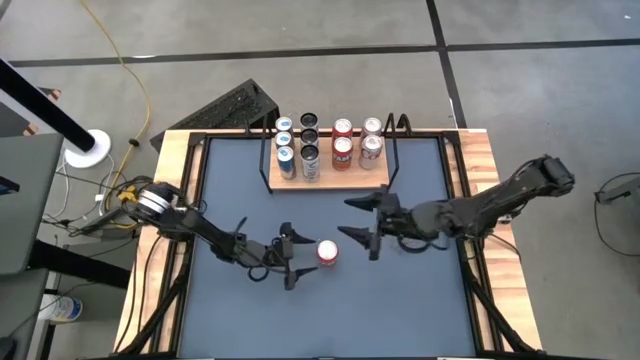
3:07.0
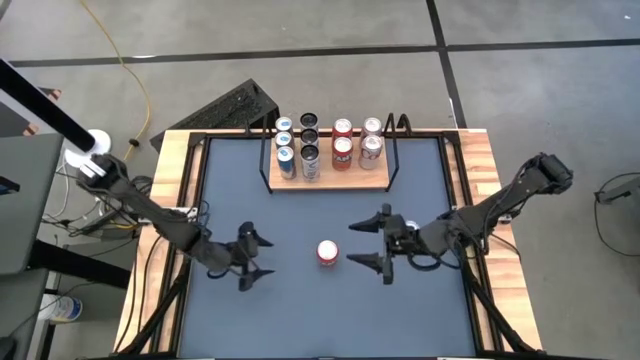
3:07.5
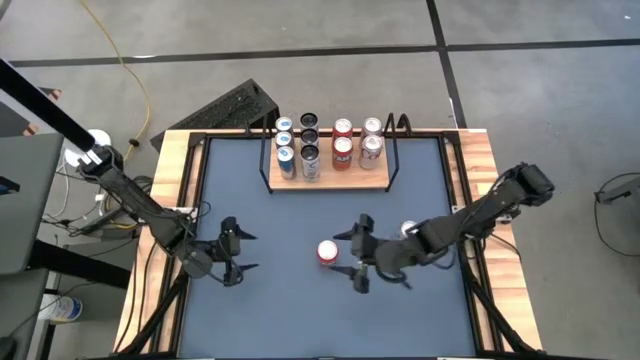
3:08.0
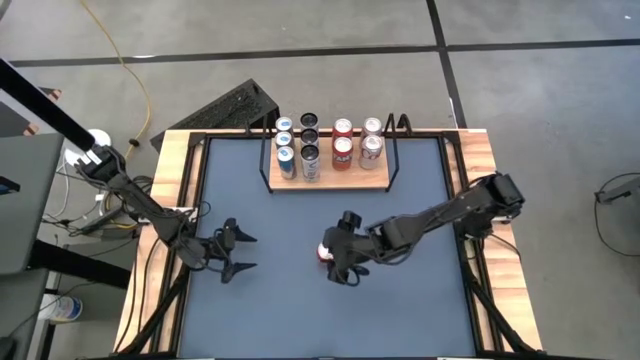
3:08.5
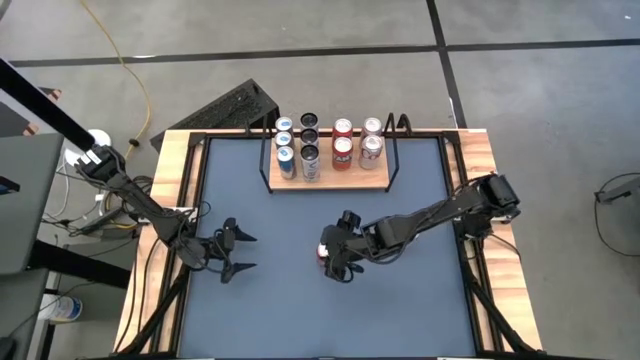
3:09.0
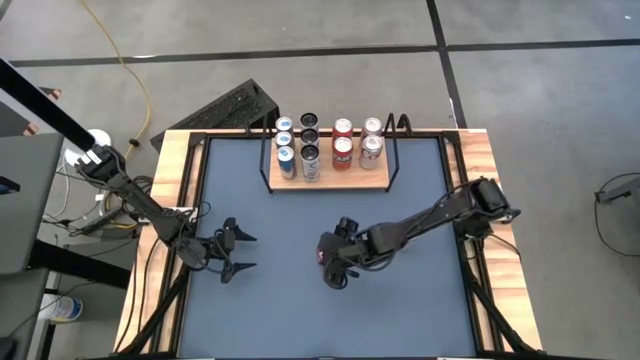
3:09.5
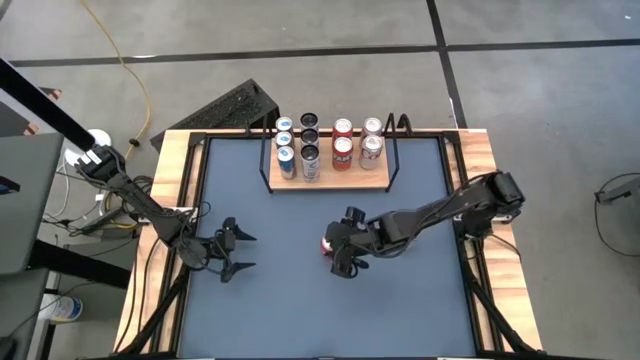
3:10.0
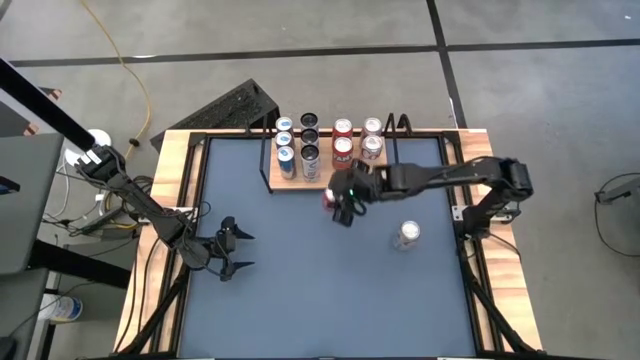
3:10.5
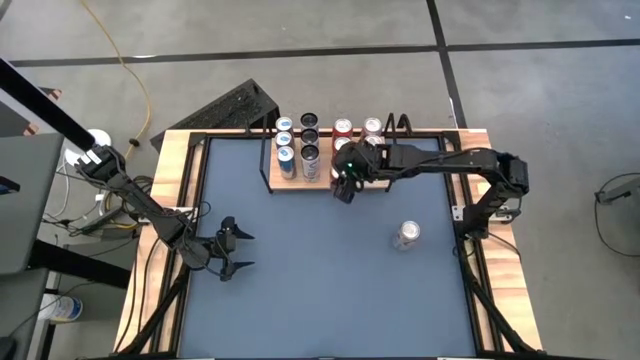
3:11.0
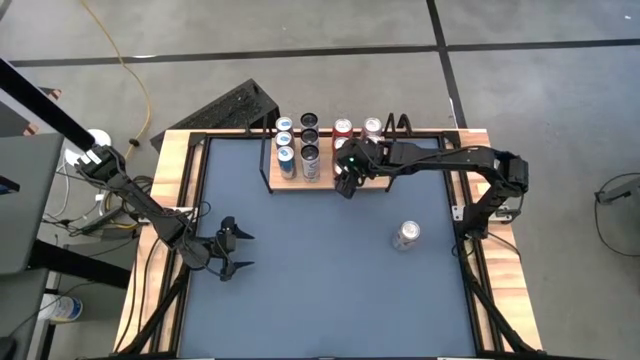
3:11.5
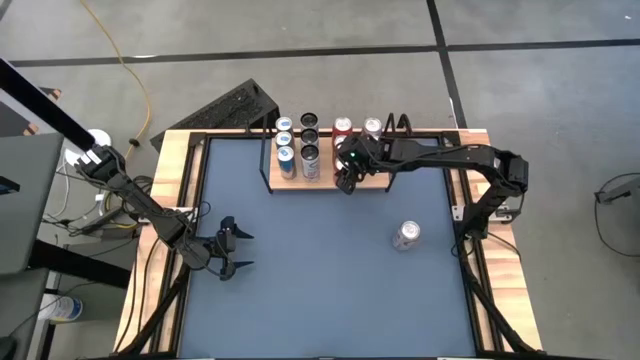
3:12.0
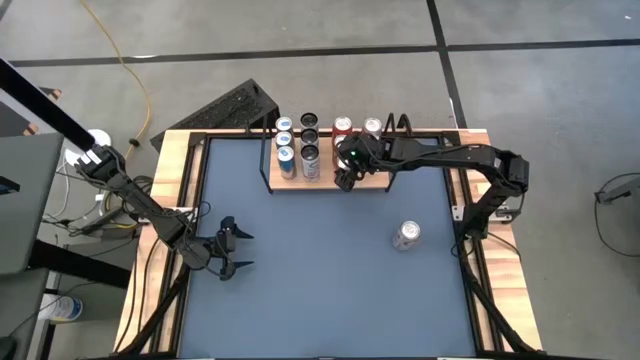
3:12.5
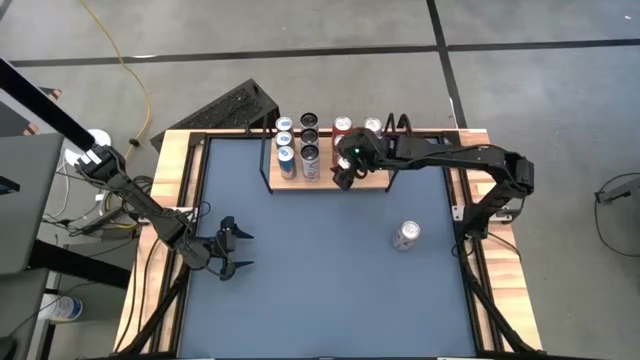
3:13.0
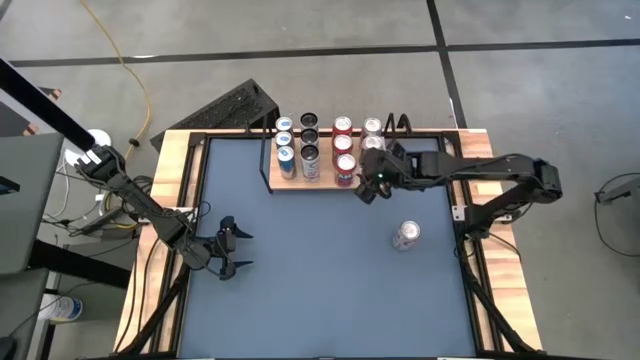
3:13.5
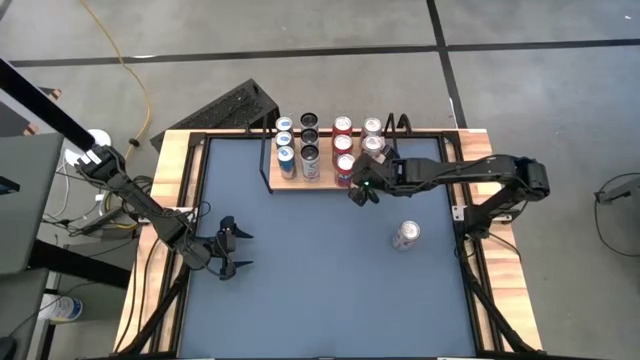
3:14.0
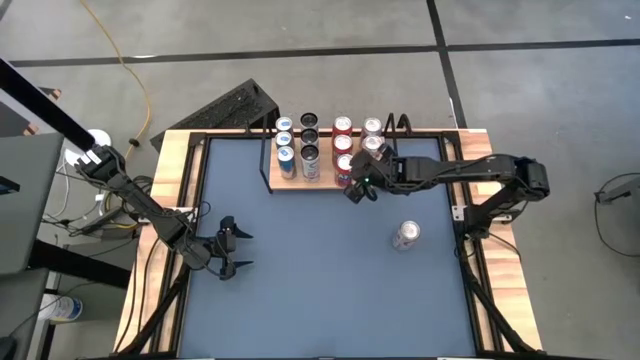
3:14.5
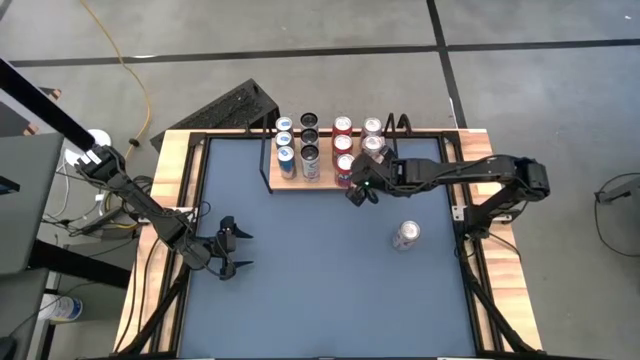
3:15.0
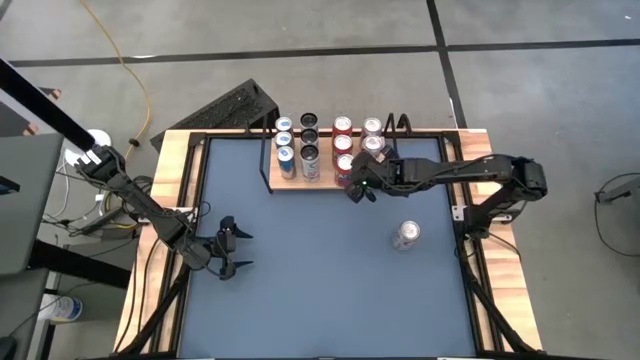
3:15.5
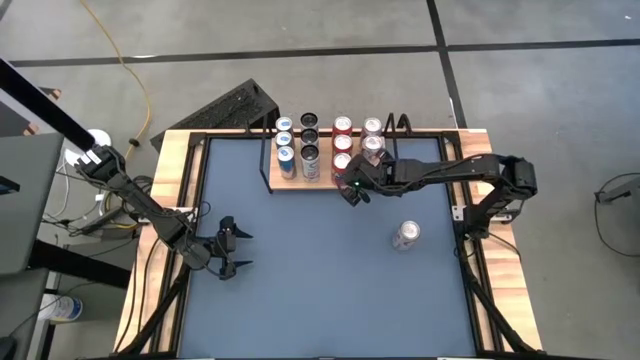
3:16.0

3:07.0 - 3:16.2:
Task: Place canned beverage on shelf
Put the orange soda can on the shelf aligned with the other orange soda cans

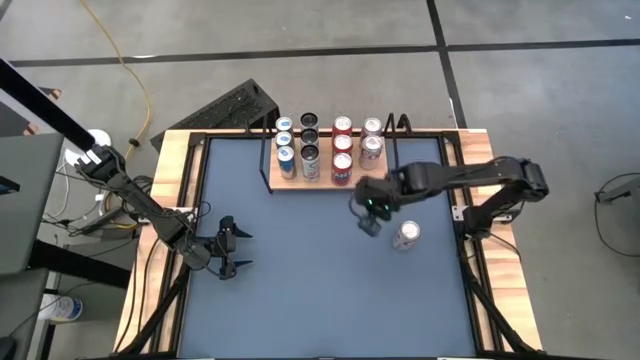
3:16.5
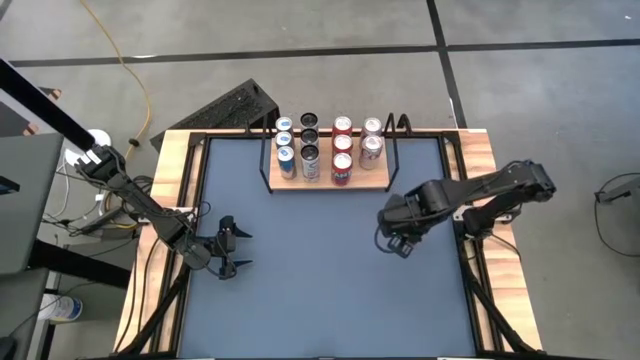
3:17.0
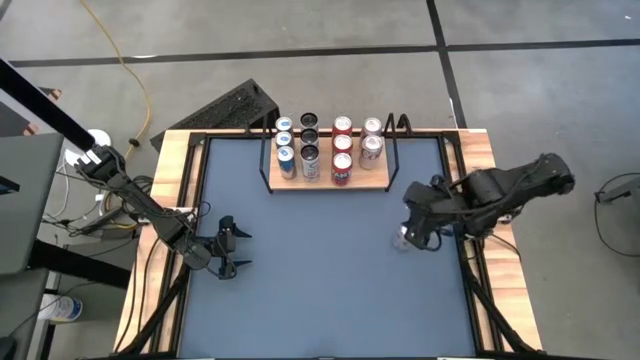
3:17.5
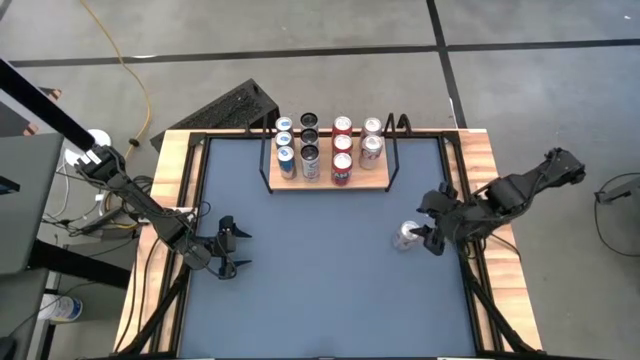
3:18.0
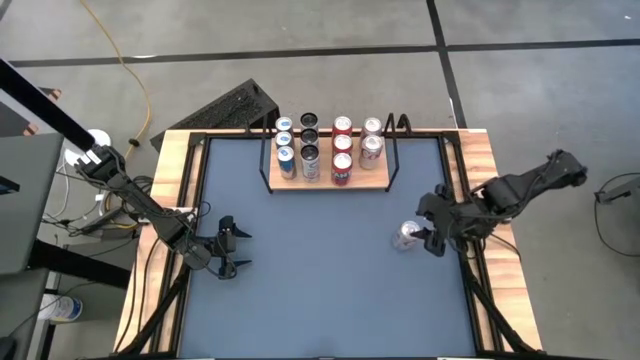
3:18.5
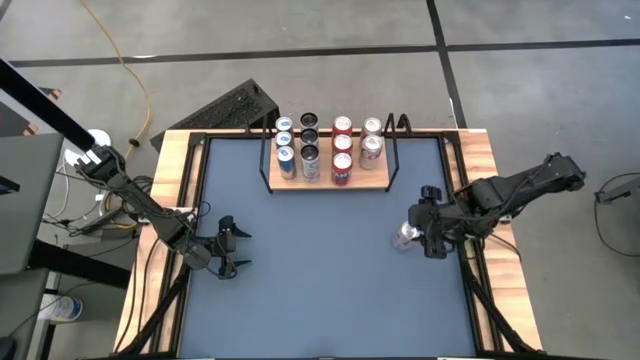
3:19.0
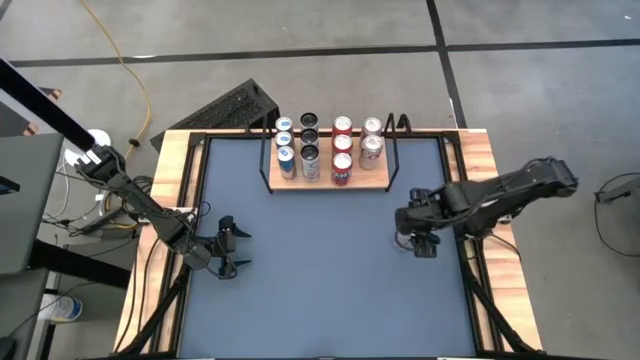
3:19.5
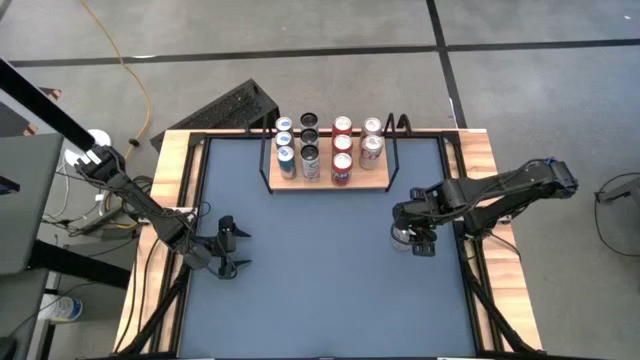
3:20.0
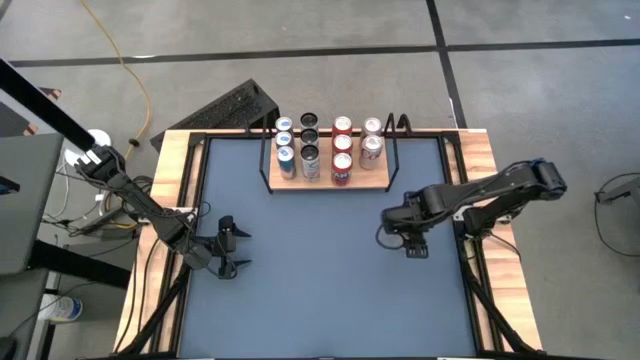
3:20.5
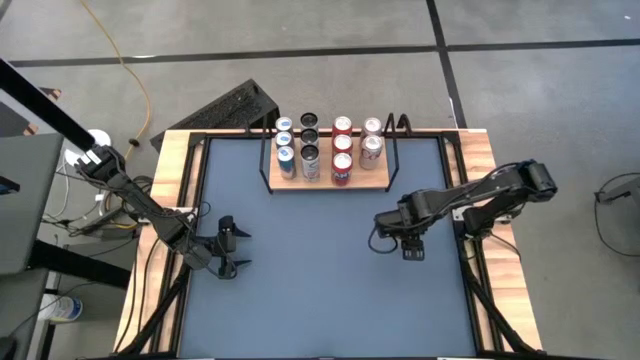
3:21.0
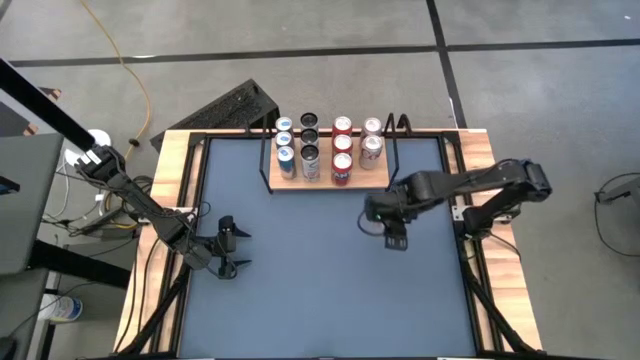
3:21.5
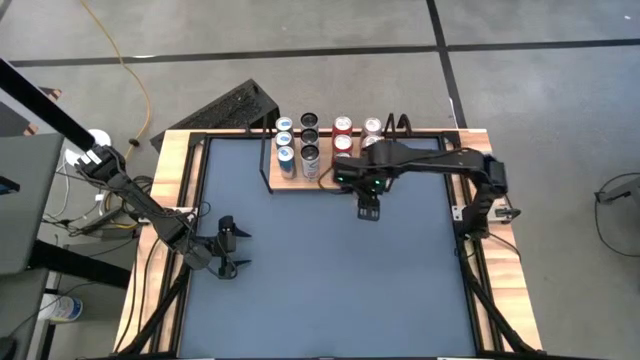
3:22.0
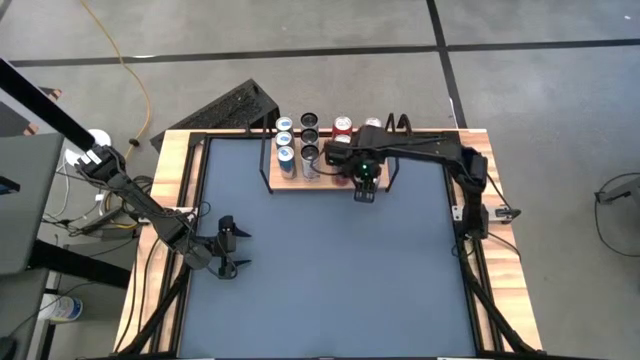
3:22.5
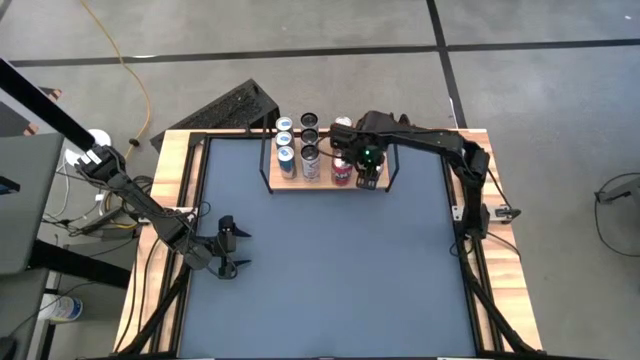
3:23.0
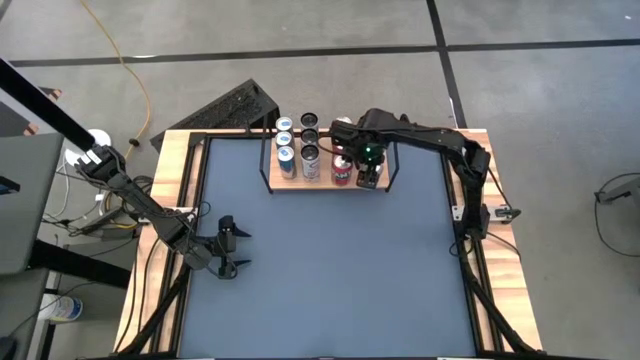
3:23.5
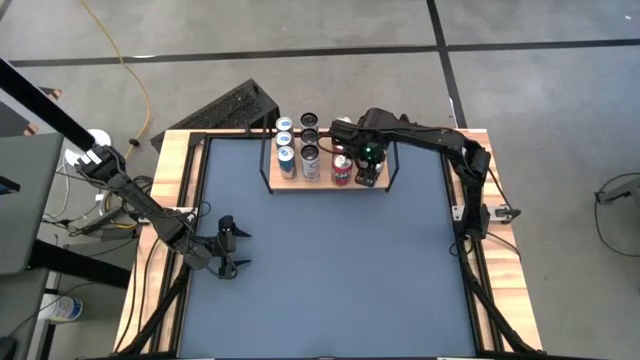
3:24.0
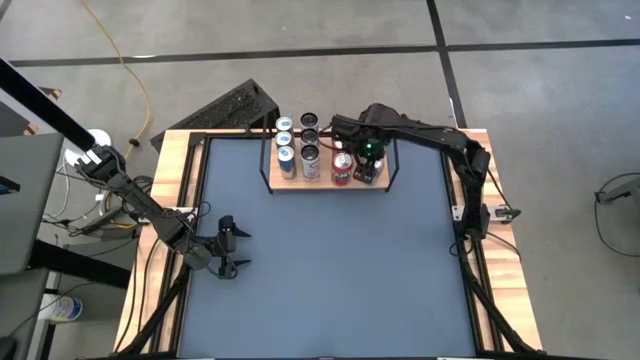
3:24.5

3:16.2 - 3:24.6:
Put the red-silver soda can on the shelf aligned with the other red-silver soda cans

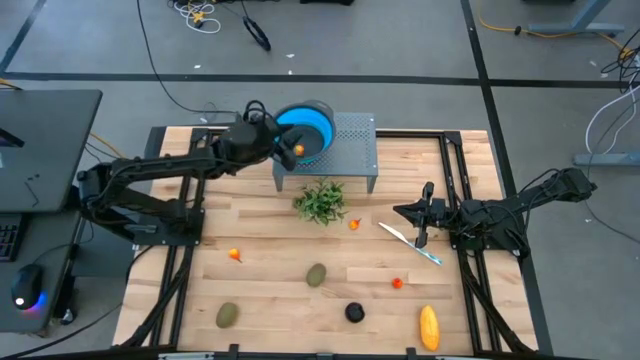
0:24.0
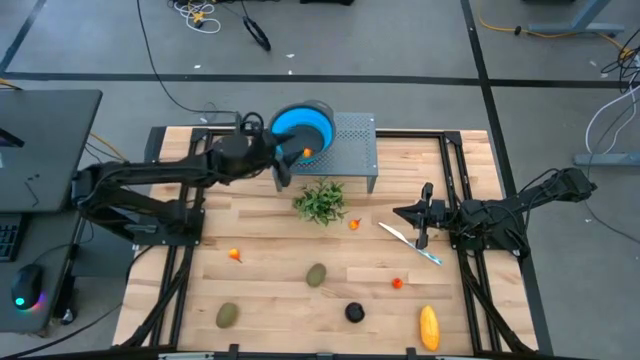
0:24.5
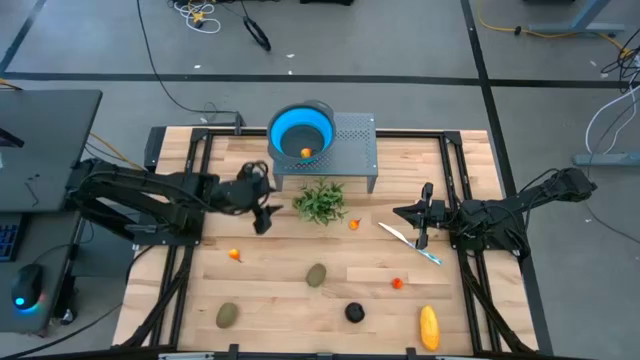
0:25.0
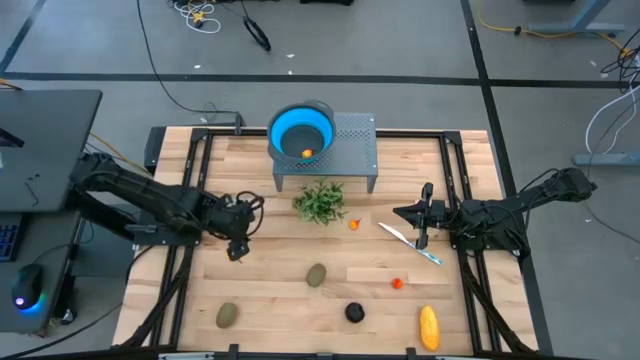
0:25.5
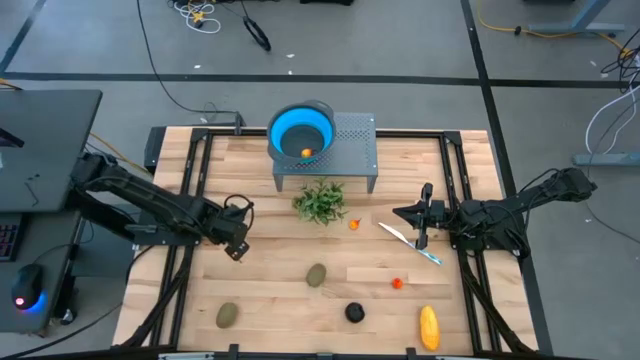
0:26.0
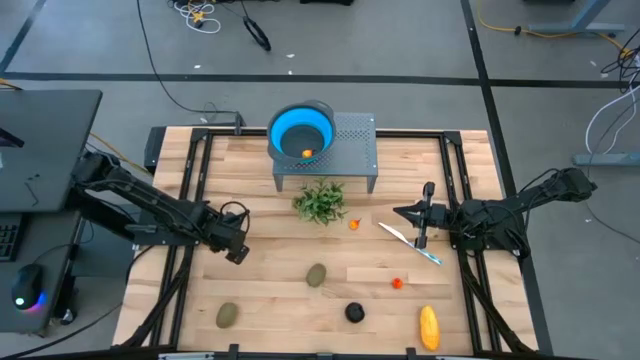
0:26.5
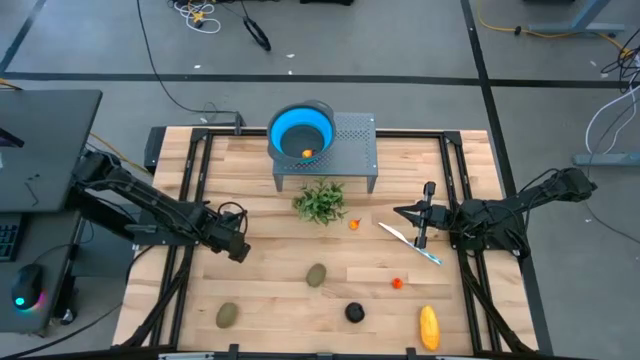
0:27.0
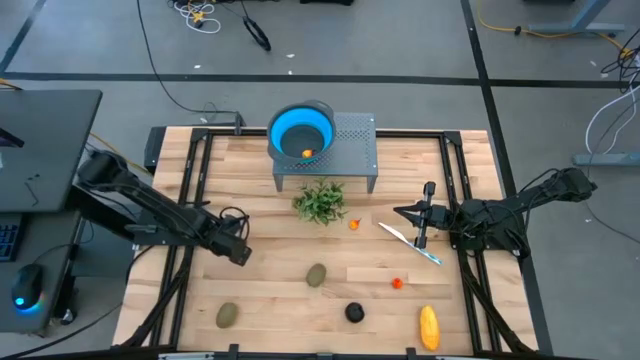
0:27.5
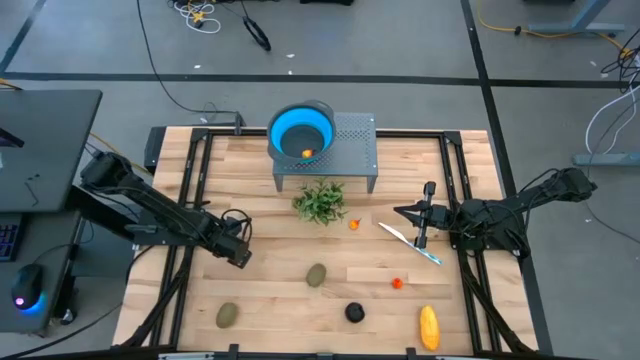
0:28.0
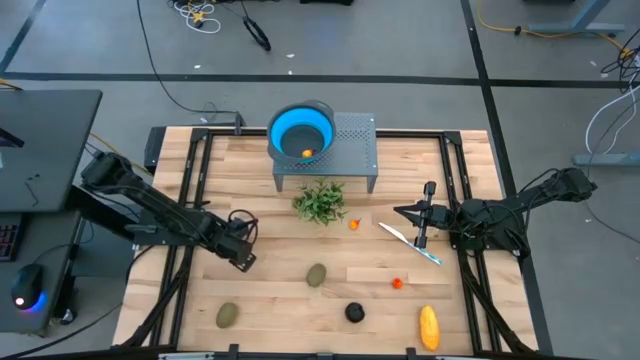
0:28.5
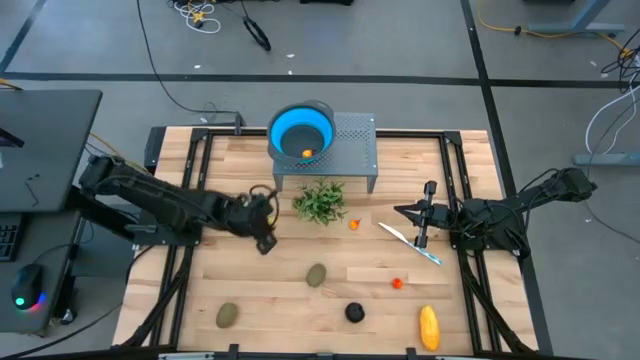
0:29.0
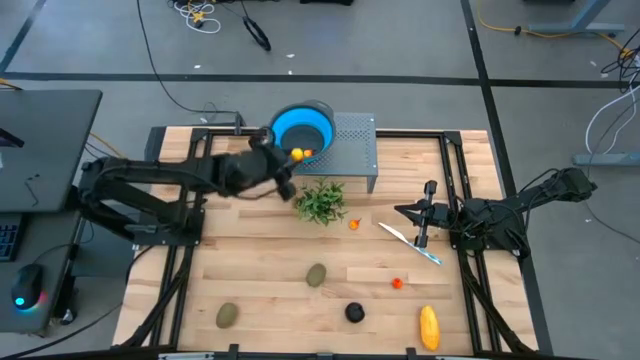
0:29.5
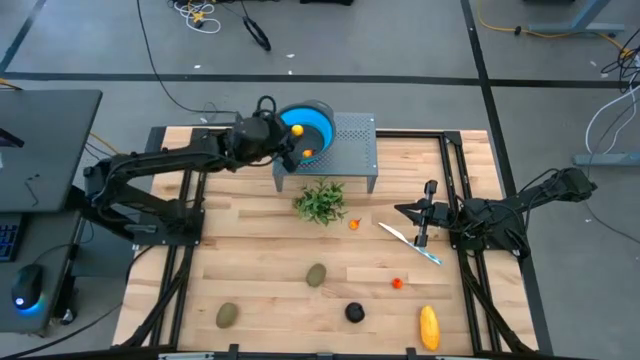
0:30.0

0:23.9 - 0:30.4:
Task: Pick & Place Fruit
Put the orange pear into the blue strainer bowl on the shelf
